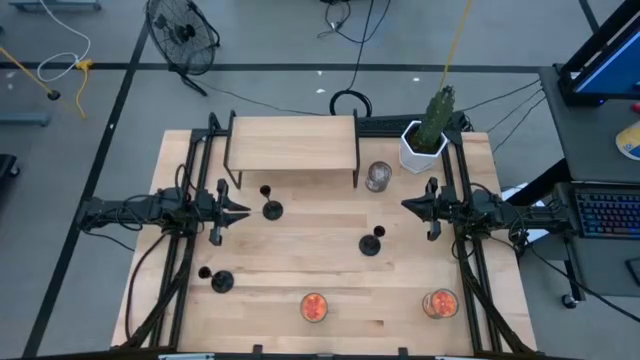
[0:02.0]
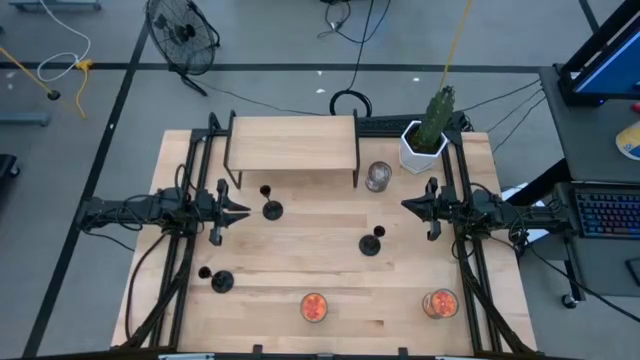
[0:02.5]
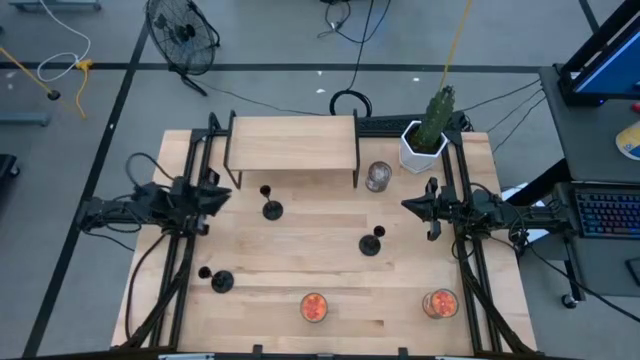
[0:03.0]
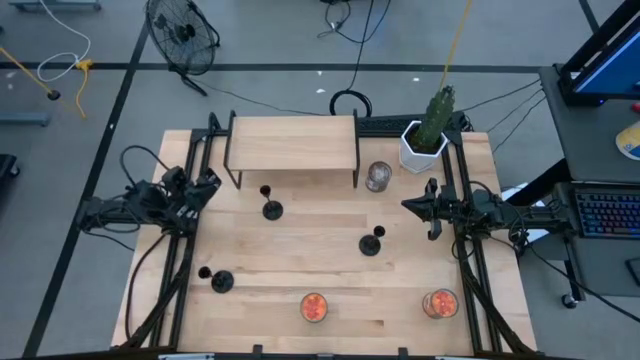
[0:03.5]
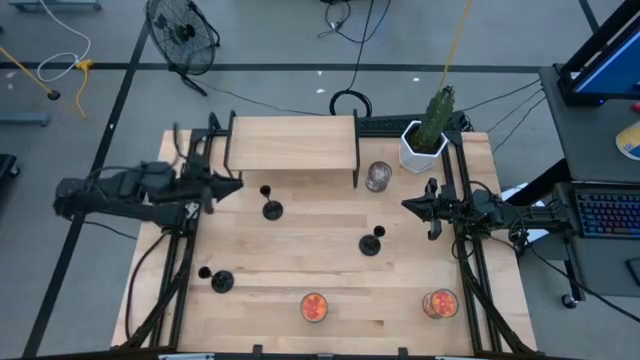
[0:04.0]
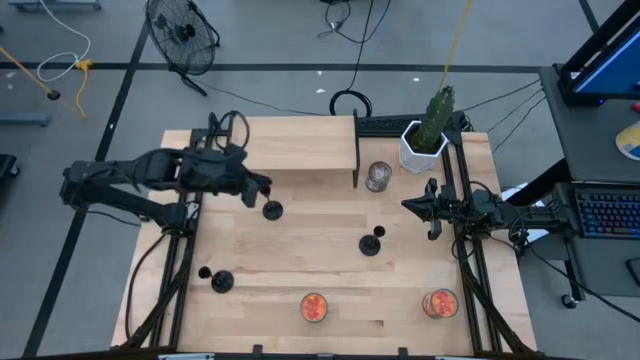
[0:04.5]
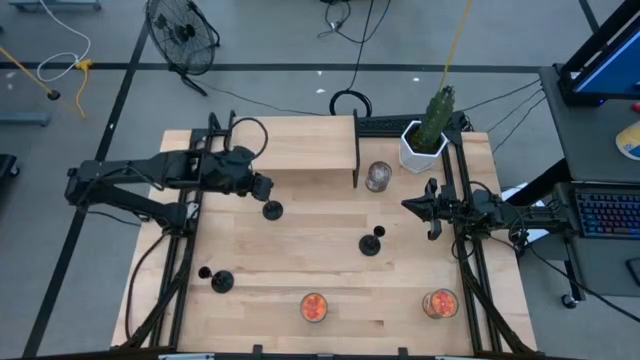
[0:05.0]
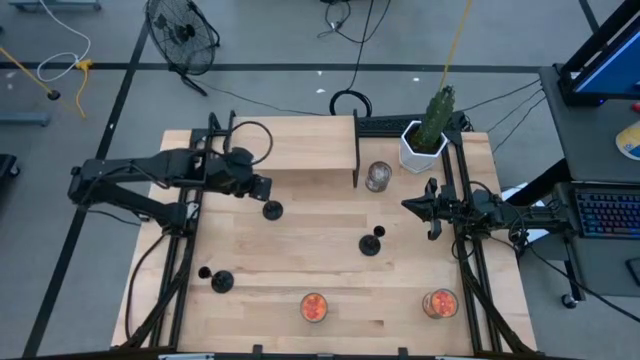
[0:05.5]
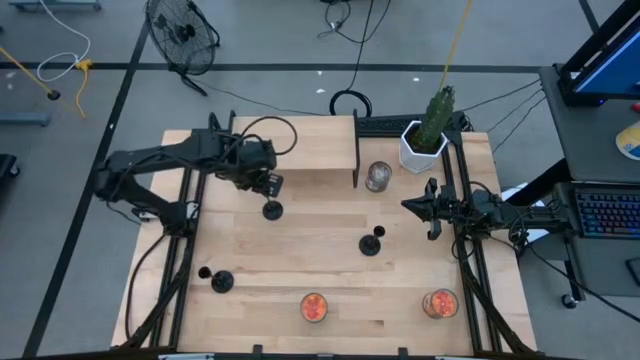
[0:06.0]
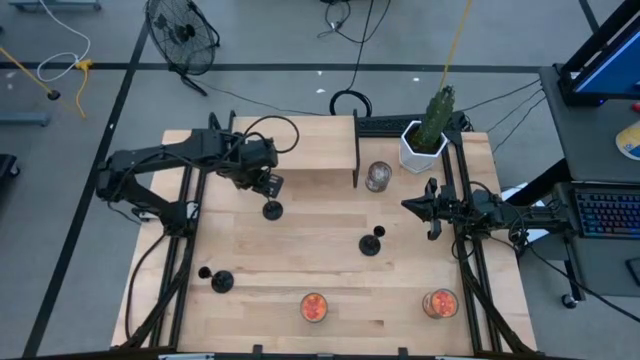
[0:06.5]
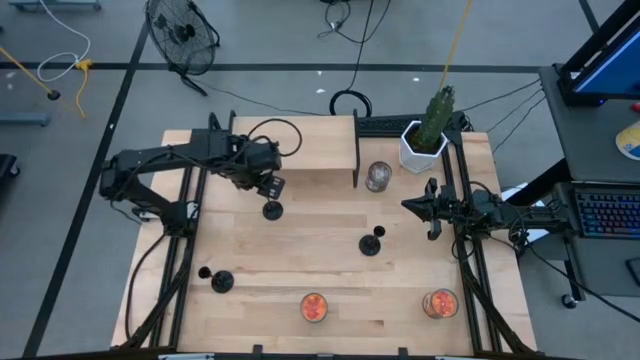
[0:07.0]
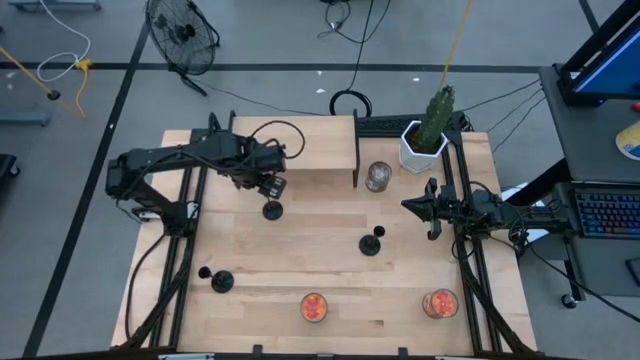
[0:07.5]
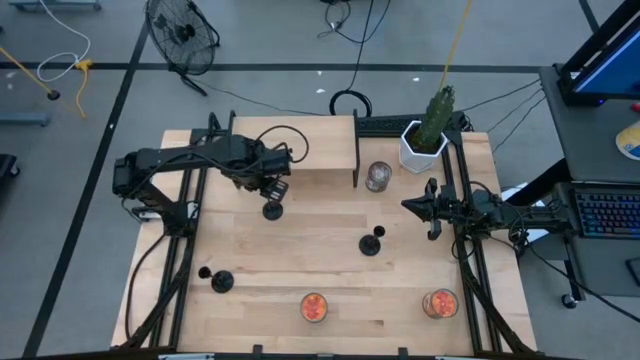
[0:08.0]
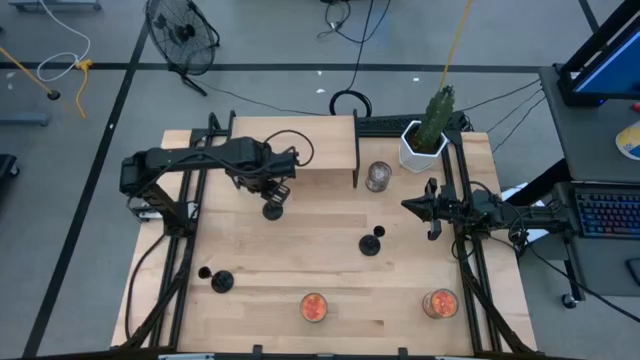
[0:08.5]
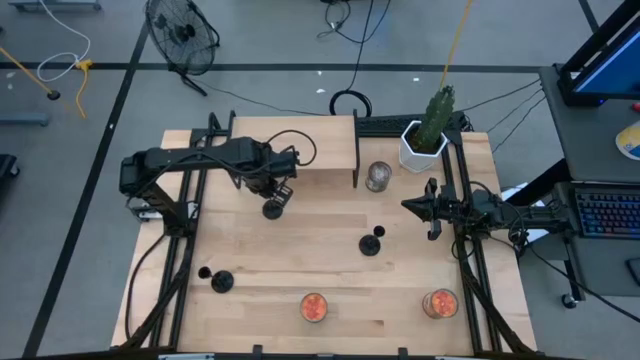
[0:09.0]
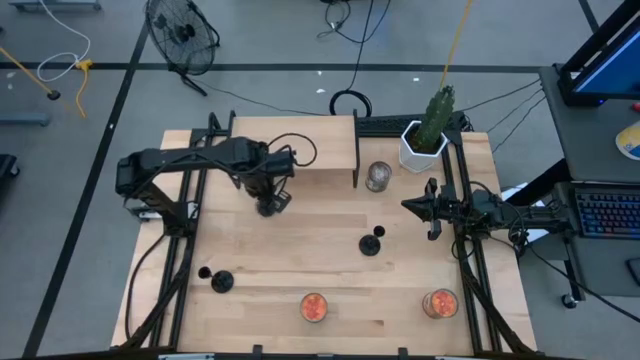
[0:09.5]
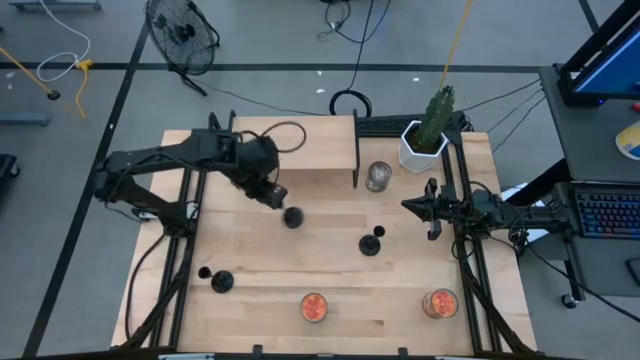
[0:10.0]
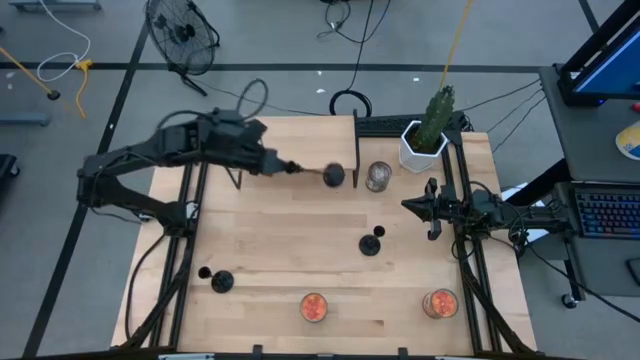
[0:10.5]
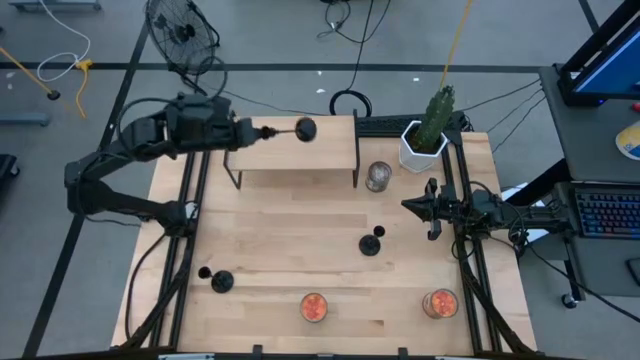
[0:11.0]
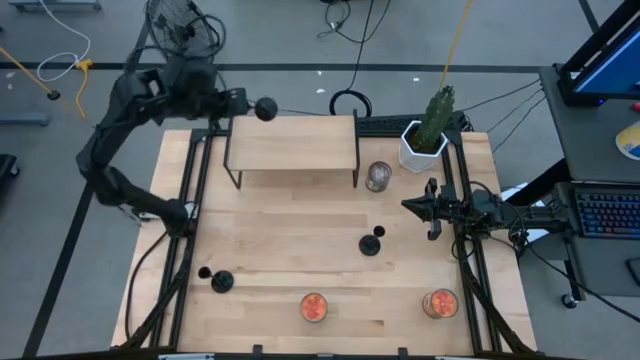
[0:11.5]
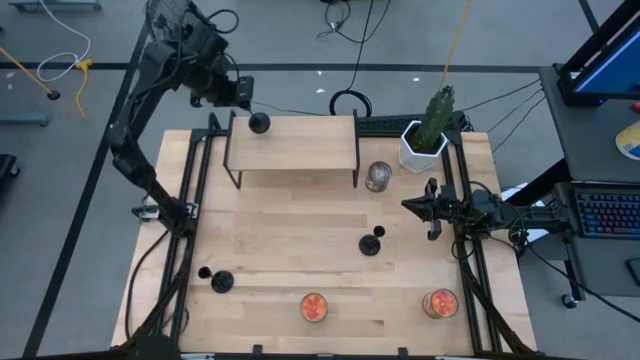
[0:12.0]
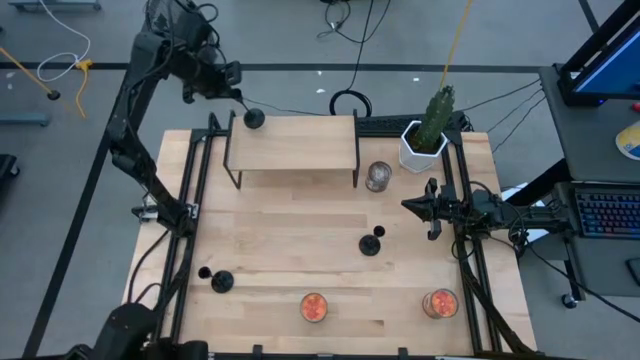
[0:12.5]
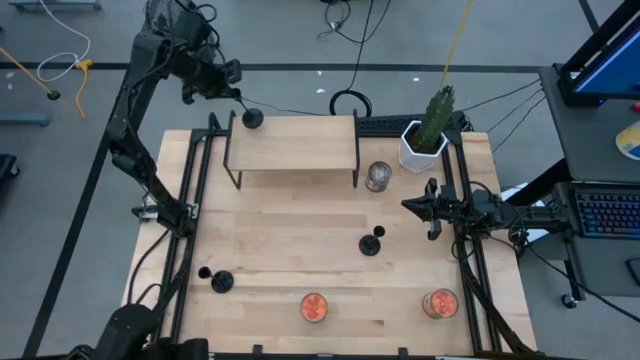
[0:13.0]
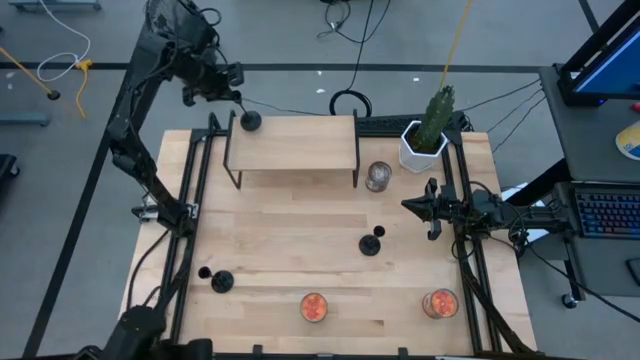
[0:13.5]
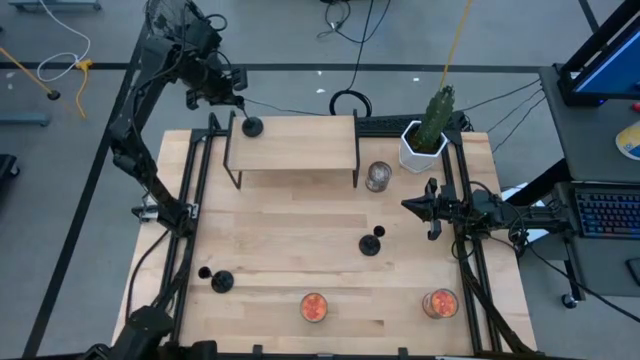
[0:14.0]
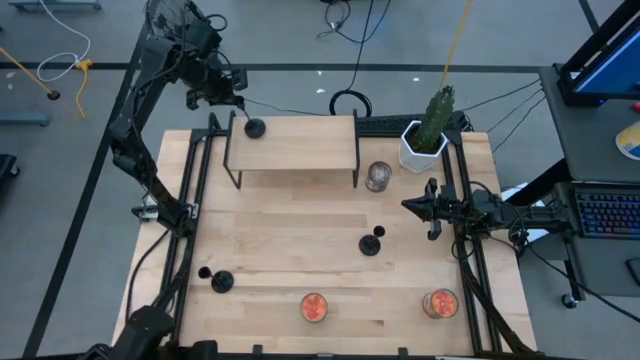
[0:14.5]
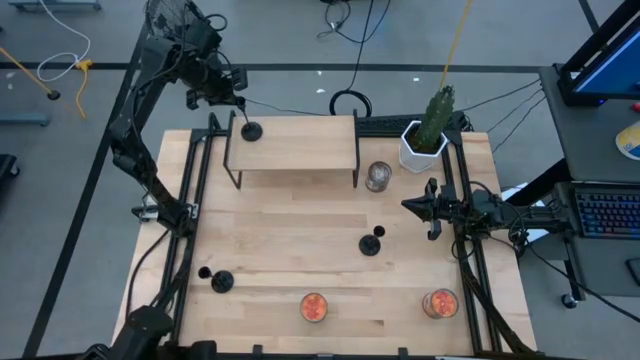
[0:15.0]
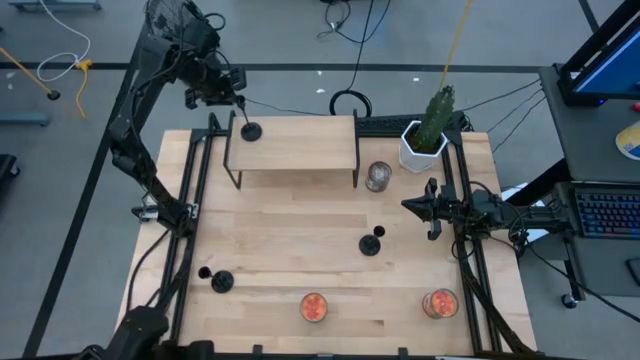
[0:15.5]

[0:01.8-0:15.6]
Task: Pick & Place candle stick holders
Put the top black candle holder on the shelf
